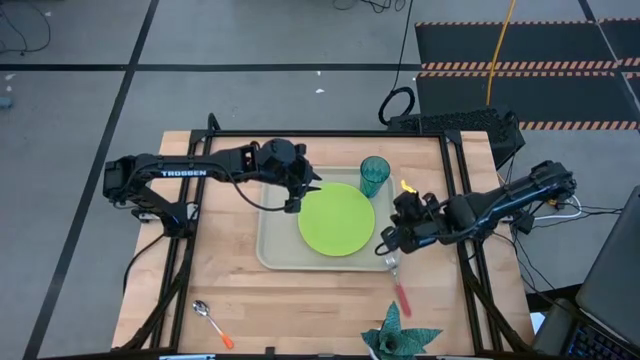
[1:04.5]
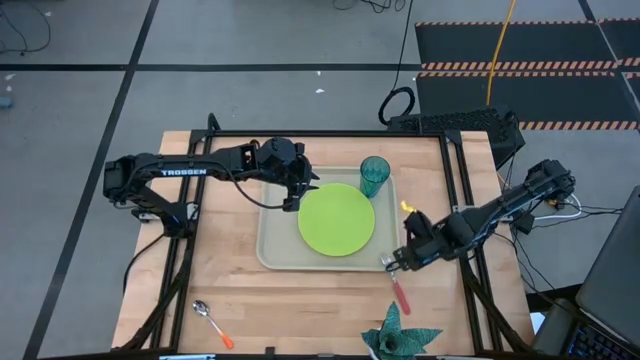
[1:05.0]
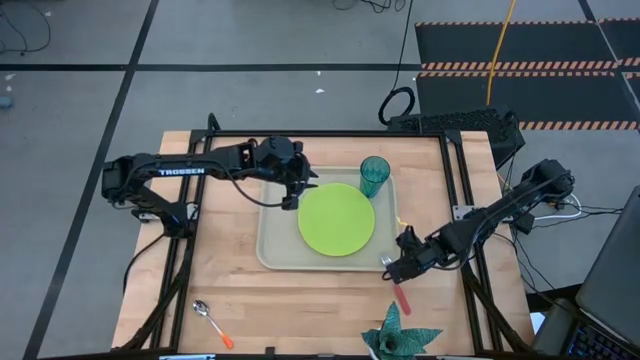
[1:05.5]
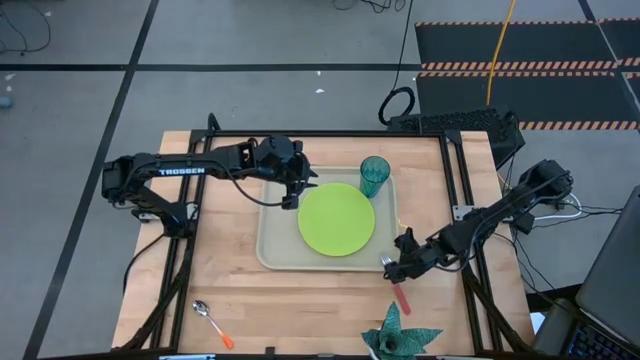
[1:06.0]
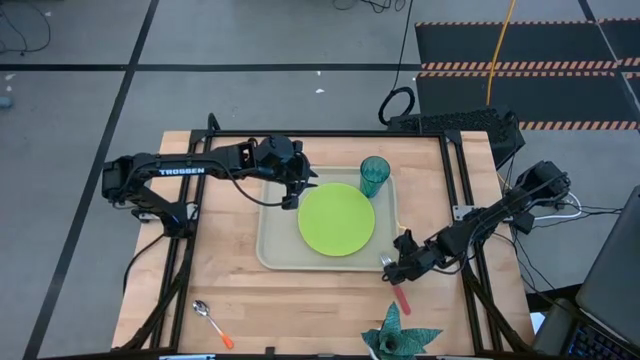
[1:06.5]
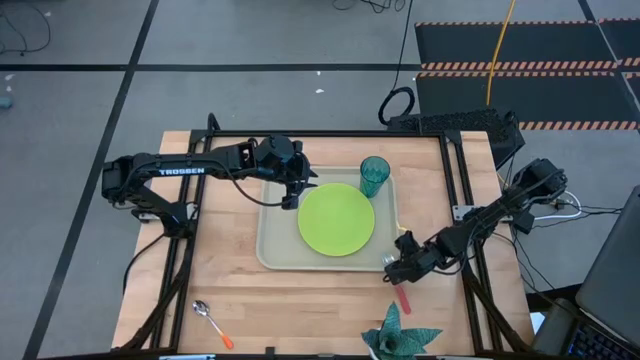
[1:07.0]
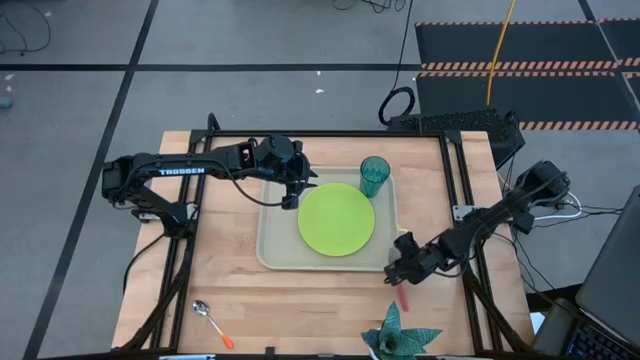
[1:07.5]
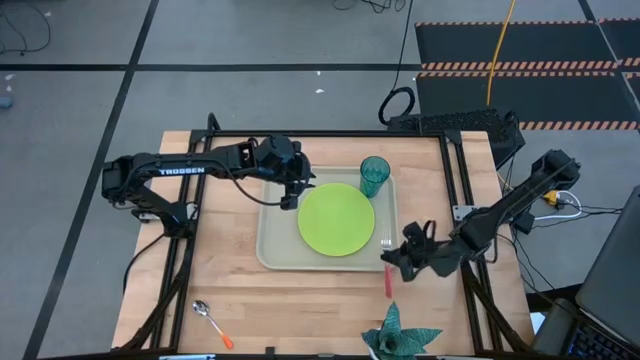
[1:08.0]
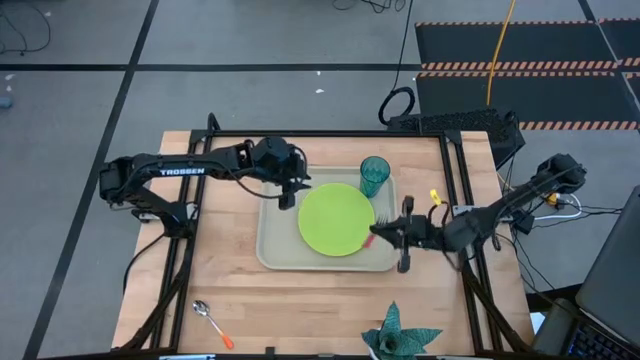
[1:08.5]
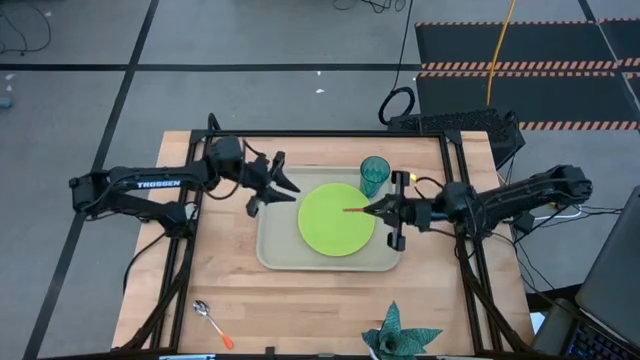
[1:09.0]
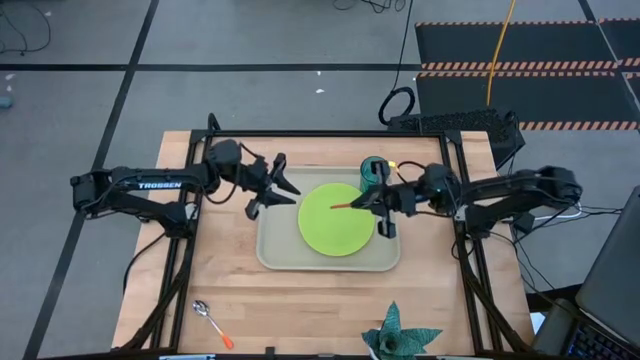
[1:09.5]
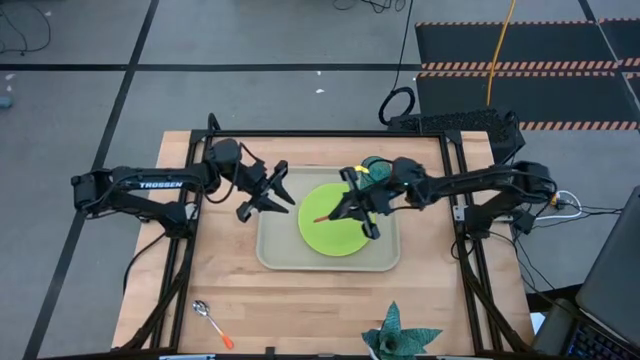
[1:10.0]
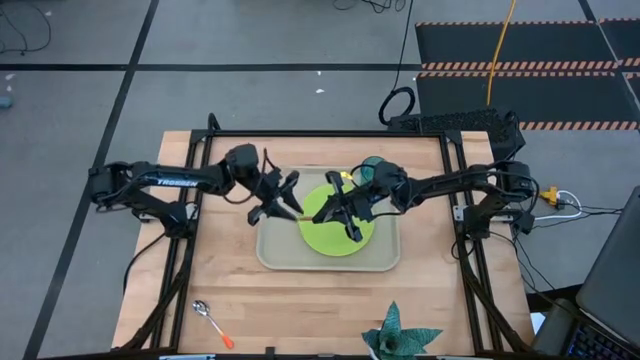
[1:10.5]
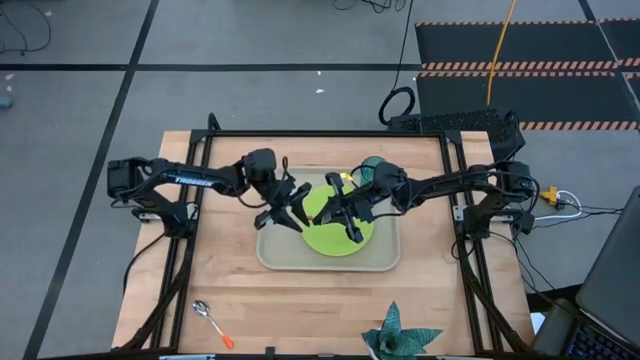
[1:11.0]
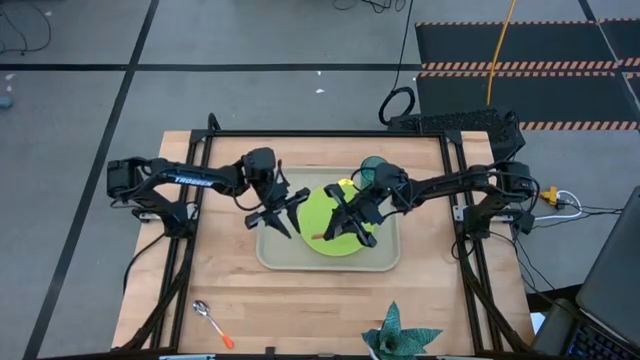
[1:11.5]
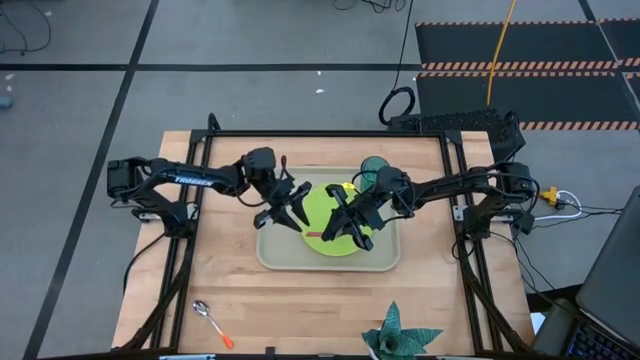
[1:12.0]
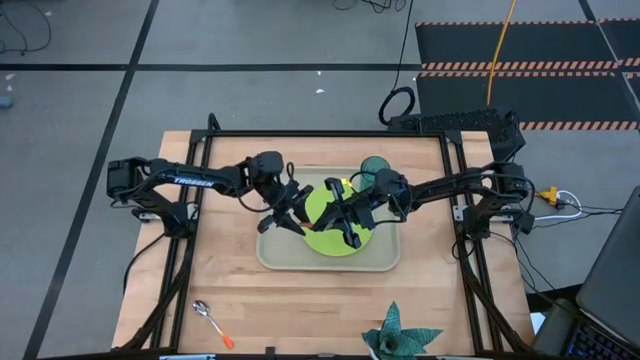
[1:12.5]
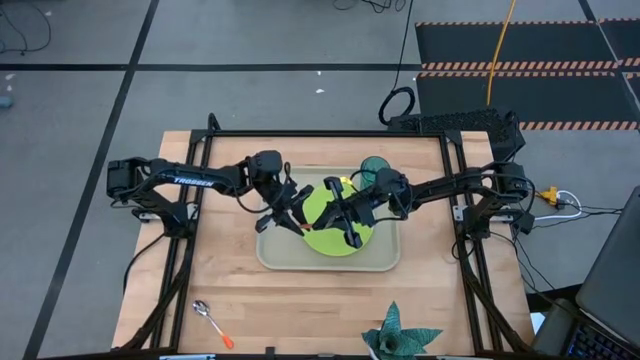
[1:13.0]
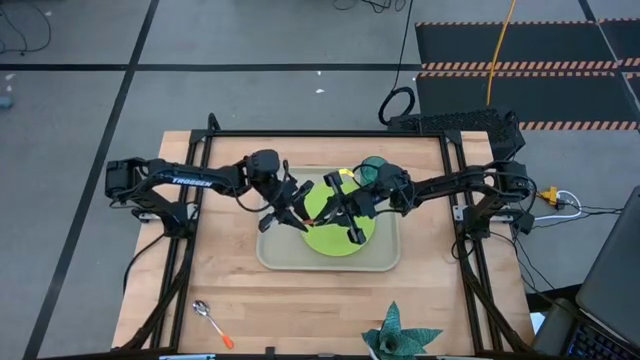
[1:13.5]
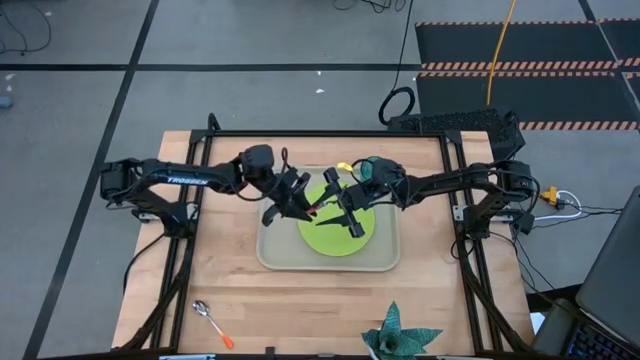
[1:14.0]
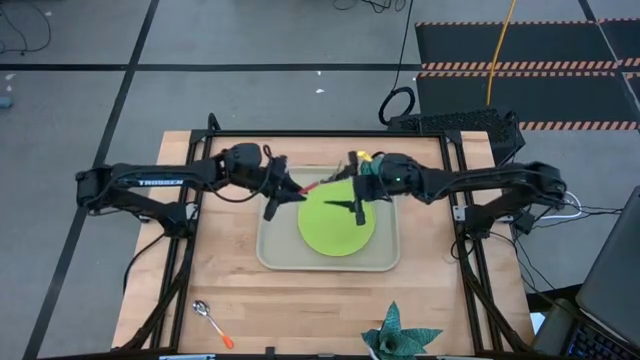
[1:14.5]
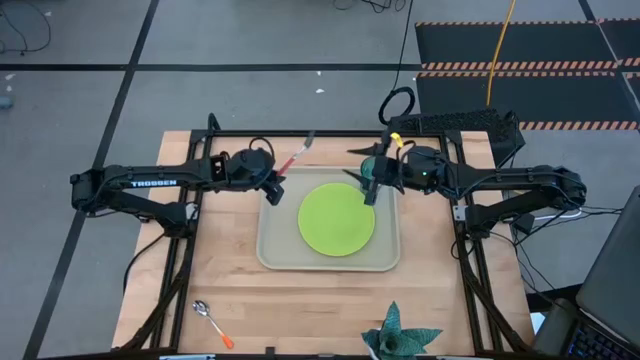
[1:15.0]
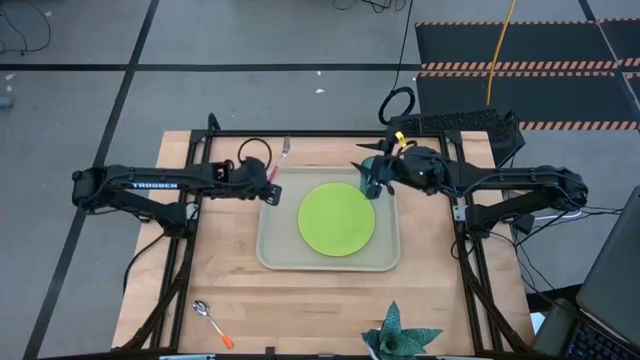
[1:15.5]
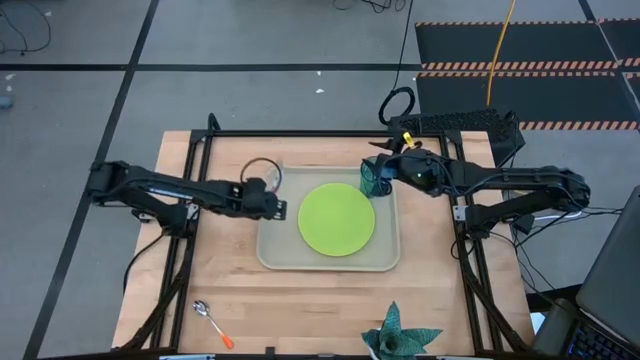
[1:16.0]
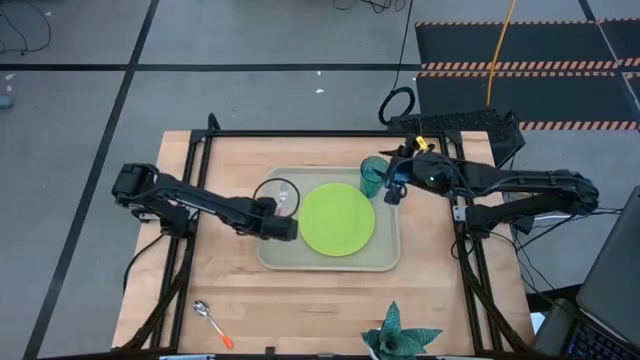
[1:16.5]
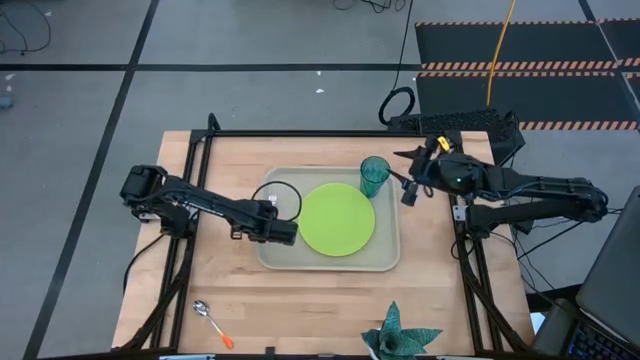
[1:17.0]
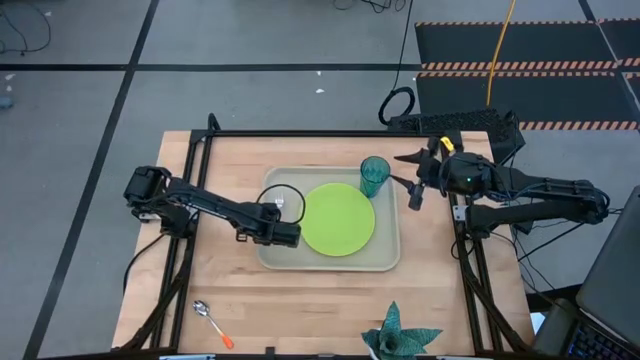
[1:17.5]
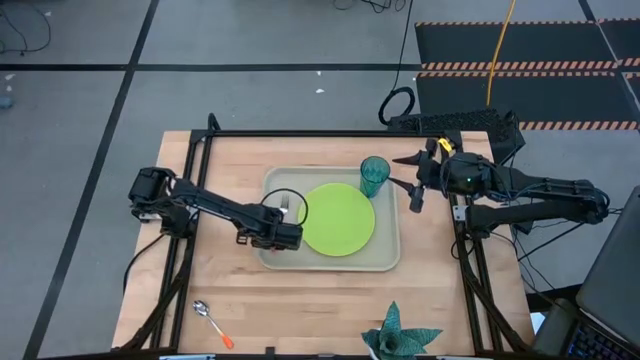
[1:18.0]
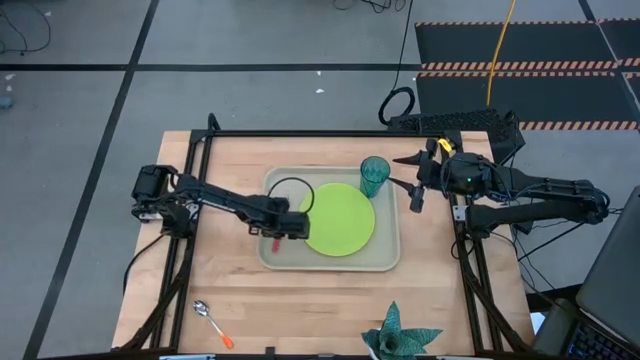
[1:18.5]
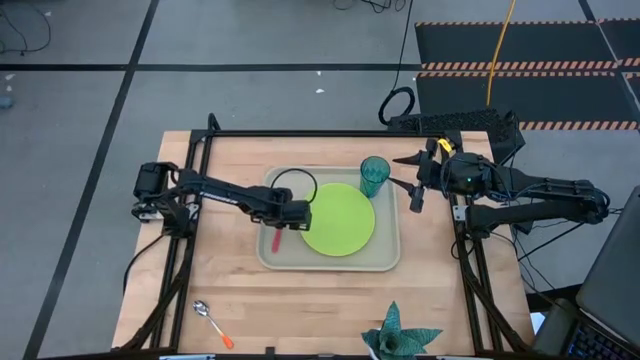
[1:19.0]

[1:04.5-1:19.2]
Task: Pick and place plate/cup/fork/spoon on tray
Put the pink fork on the light brown serving tray to the left of the light green plate

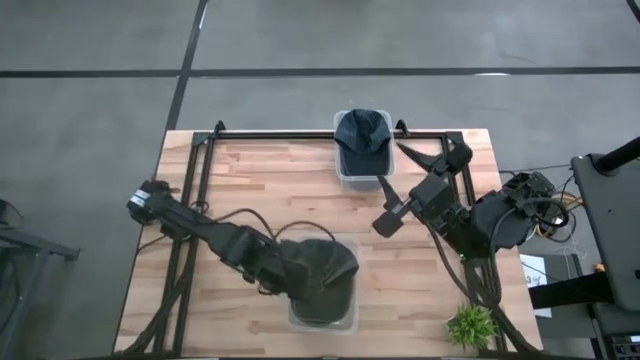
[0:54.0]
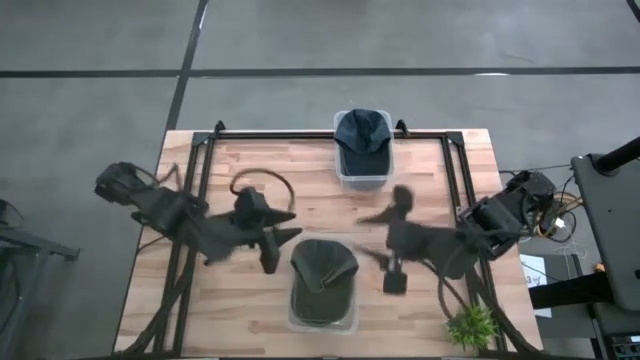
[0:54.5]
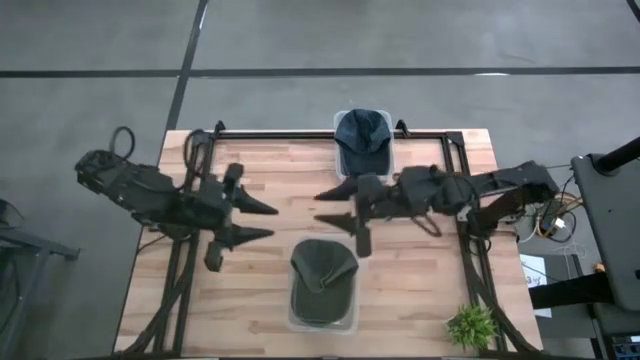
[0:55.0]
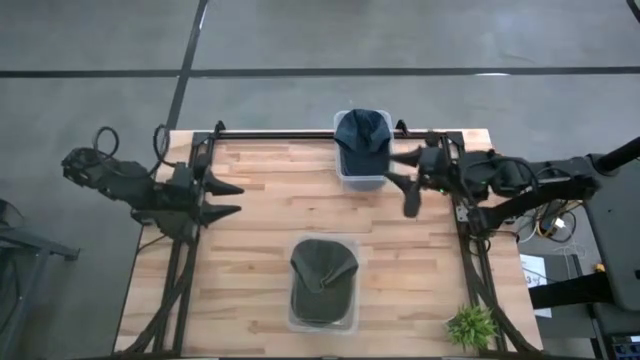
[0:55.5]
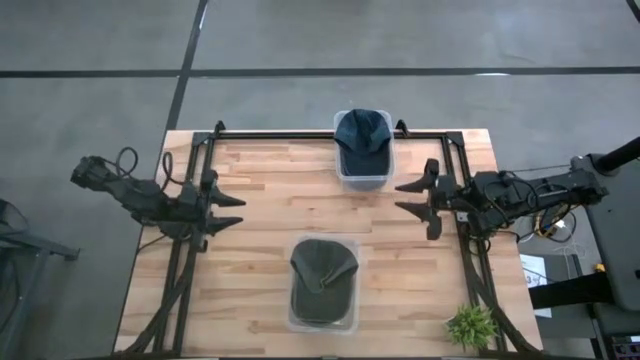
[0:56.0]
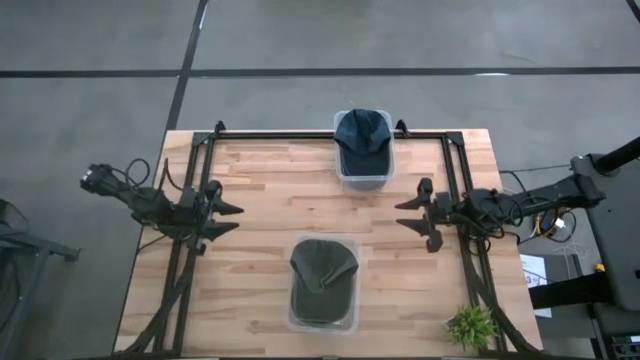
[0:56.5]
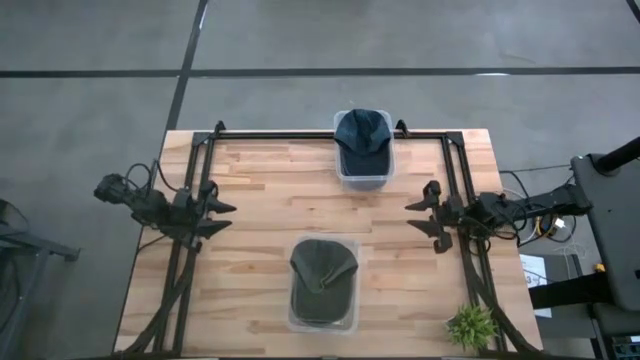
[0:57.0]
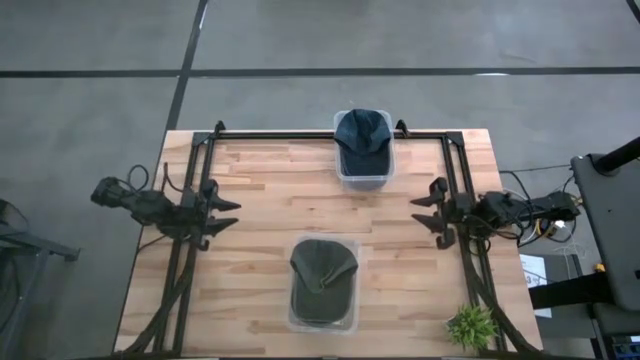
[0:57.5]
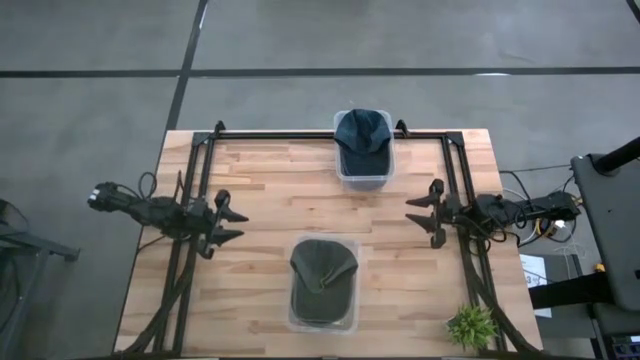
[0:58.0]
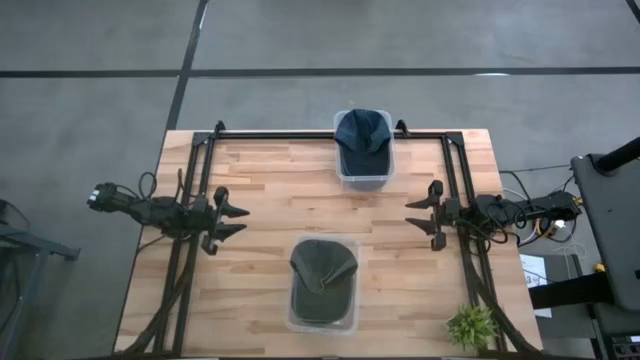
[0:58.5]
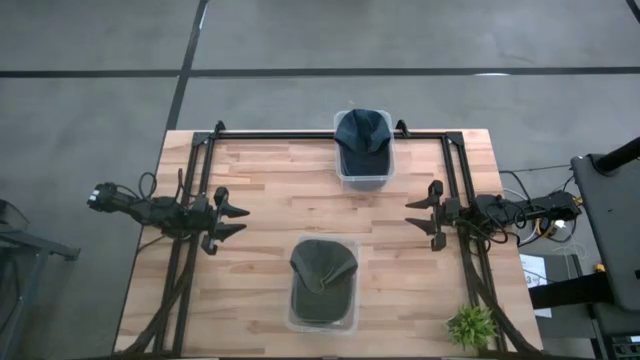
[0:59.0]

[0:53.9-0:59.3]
Task: Pick & Place hat
Return to Home Position
